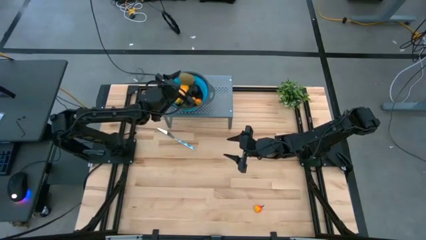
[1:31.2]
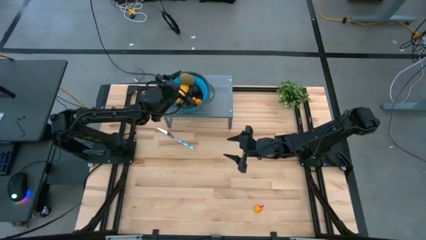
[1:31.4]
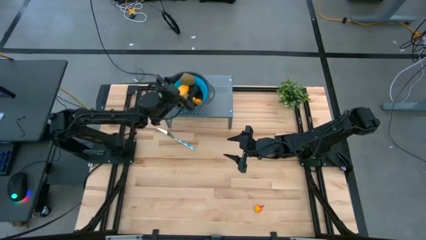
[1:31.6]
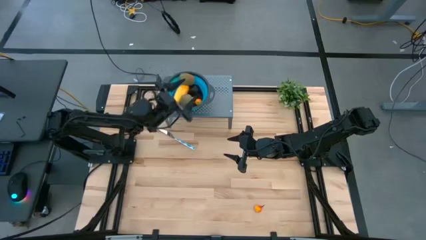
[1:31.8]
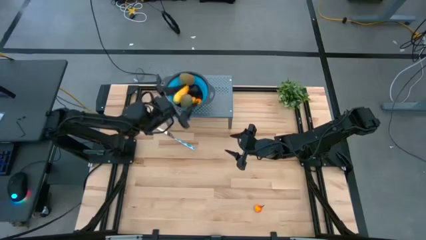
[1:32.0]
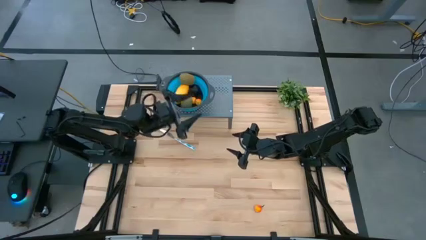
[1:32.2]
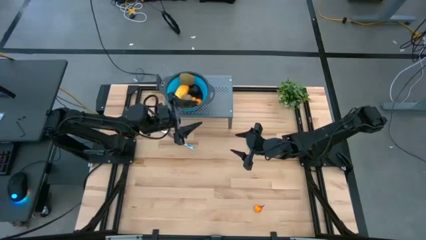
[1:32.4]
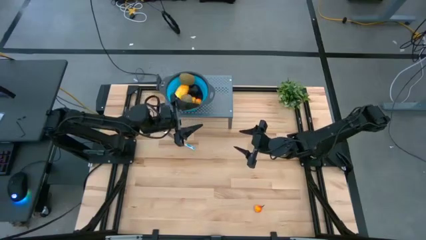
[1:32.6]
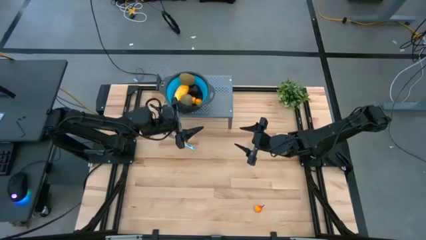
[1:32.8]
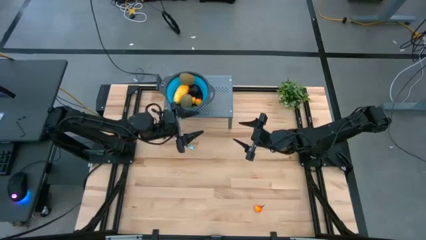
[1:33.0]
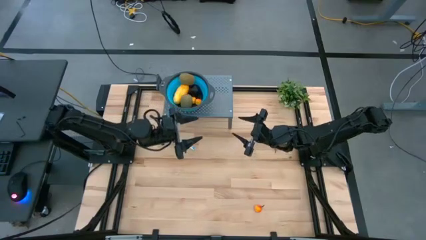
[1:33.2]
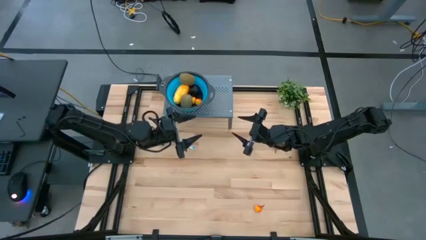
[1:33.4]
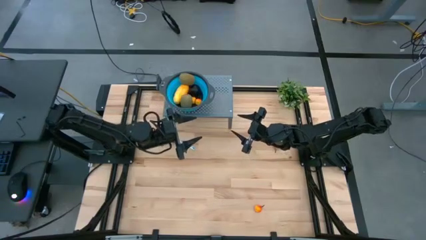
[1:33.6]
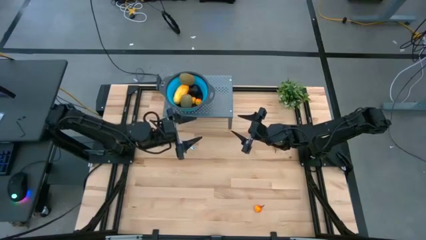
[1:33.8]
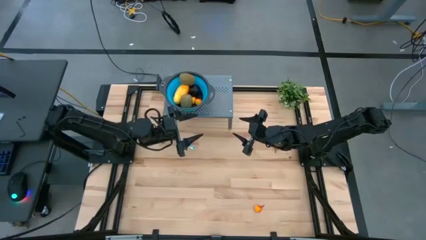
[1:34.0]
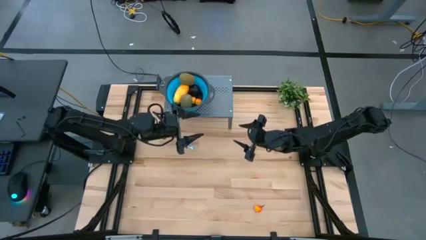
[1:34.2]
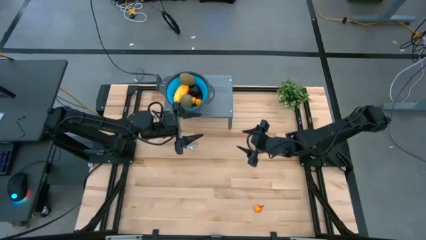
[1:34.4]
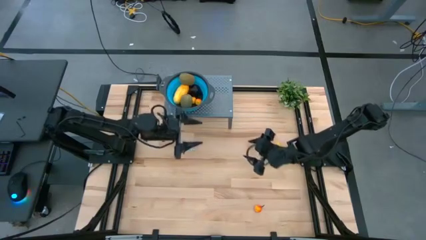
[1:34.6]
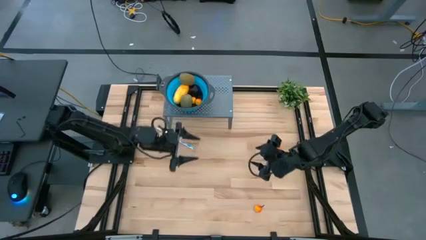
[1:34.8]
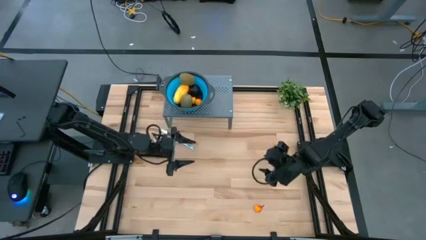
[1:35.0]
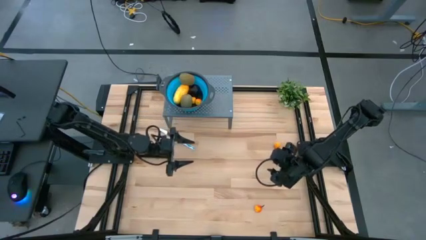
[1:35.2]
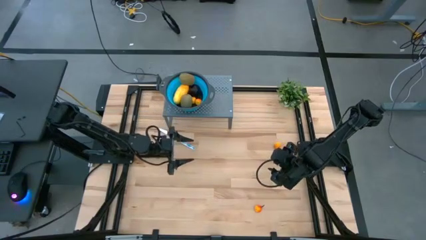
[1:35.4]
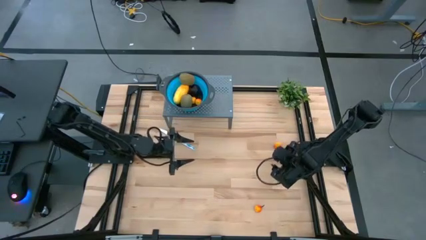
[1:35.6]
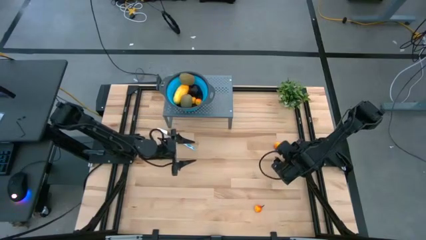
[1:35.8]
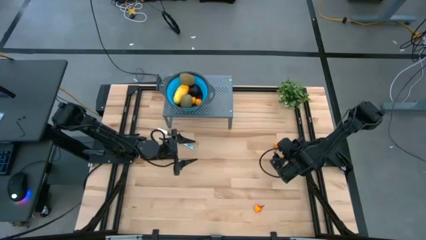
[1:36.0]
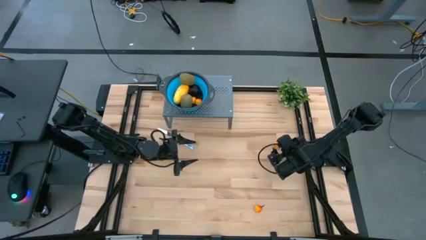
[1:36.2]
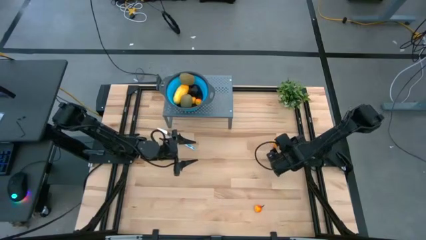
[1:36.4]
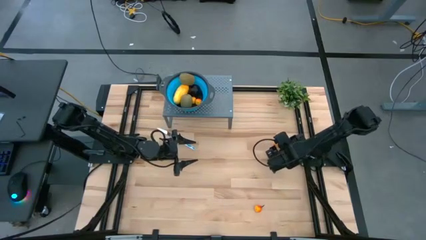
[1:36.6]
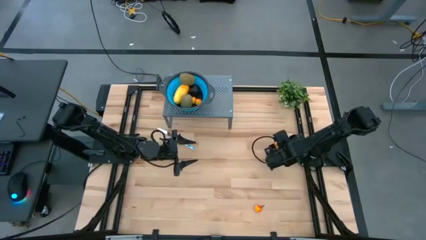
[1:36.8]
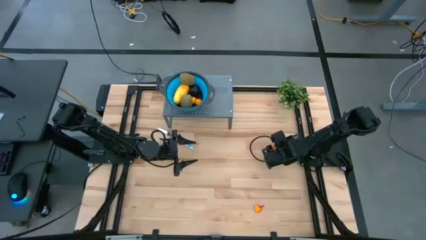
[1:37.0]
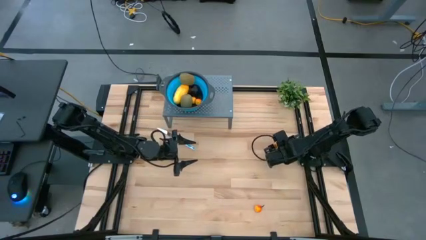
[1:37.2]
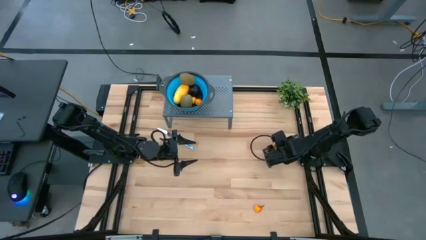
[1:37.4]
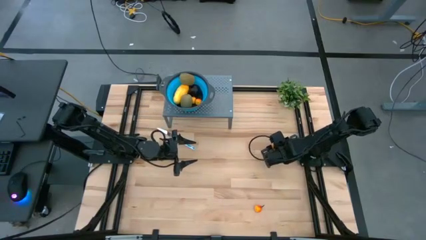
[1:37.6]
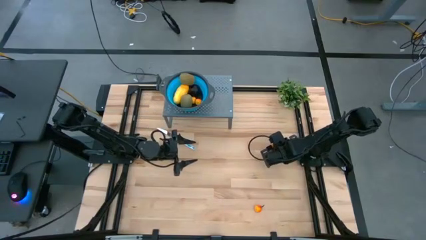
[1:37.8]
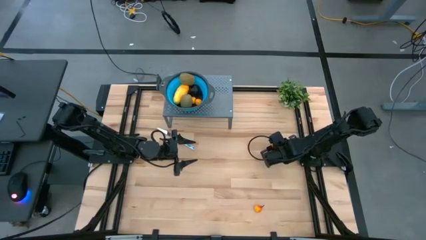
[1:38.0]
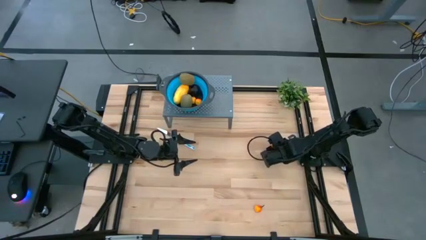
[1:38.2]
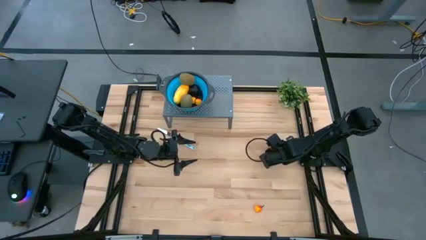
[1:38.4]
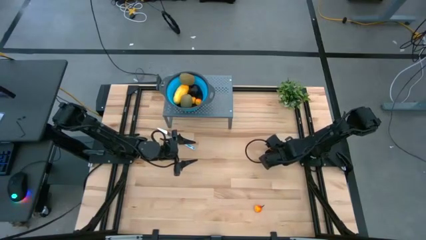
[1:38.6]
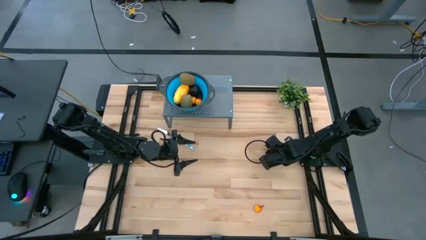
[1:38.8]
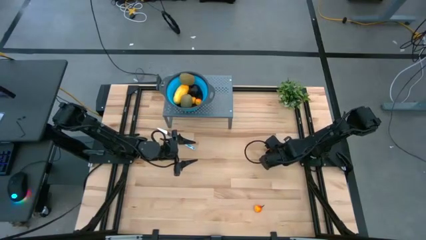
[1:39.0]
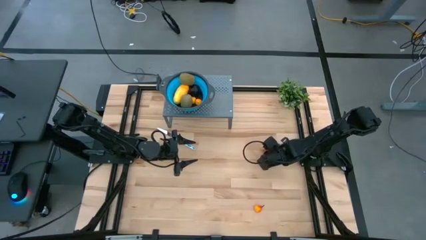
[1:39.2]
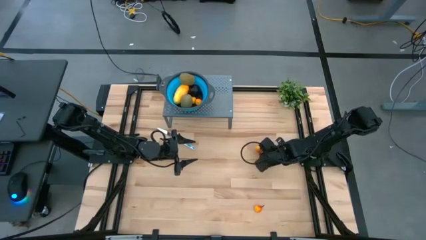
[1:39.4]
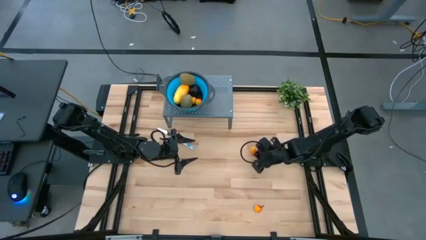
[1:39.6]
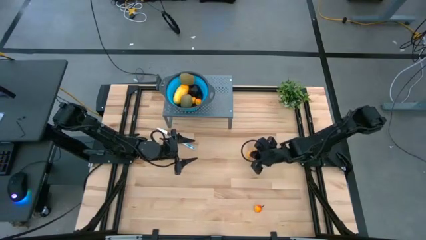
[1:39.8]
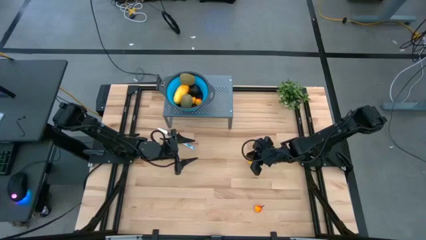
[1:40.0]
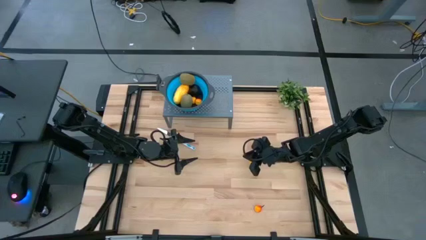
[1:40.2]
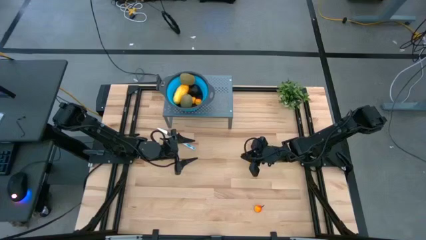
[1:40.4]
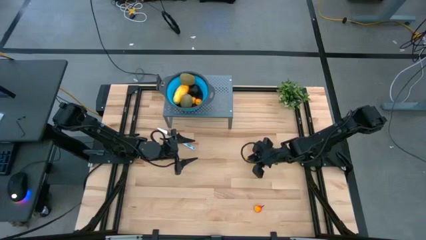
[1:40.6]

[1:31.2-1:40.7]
Task: Pick & Place Fruit
Put the pear into the blue strainer bowl
